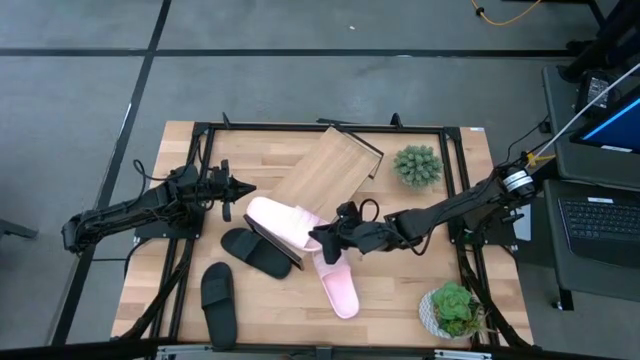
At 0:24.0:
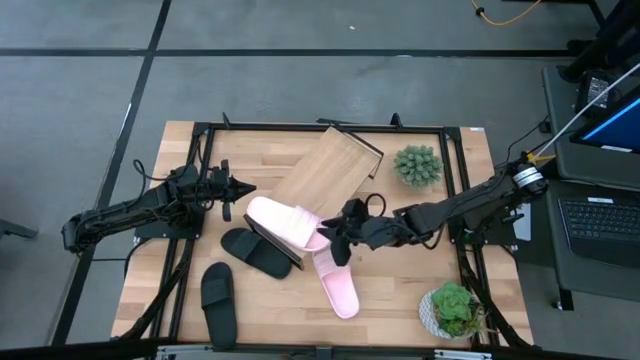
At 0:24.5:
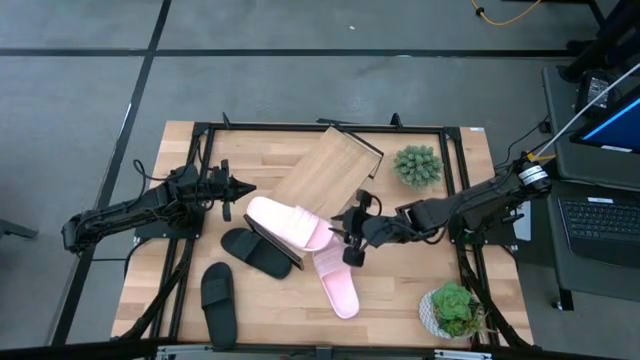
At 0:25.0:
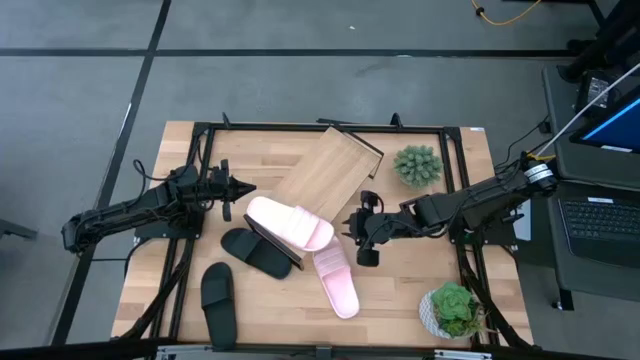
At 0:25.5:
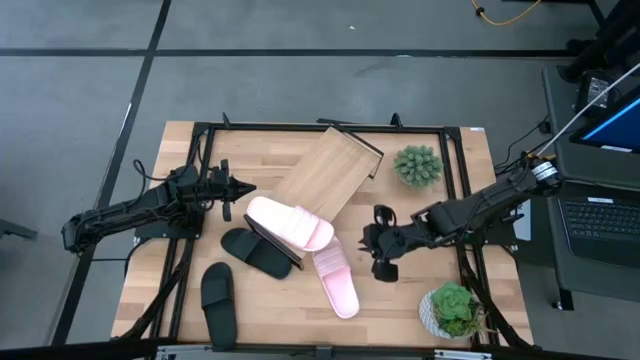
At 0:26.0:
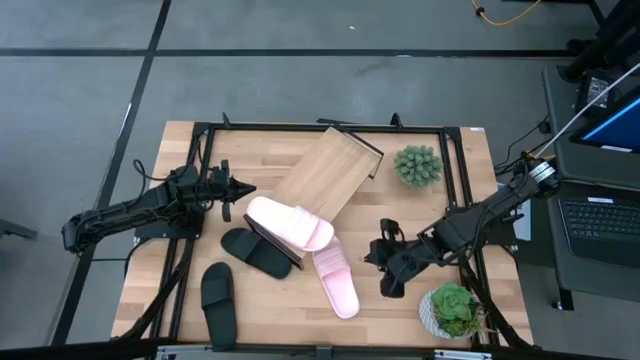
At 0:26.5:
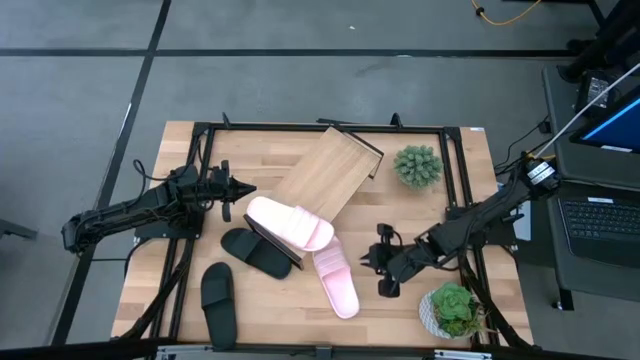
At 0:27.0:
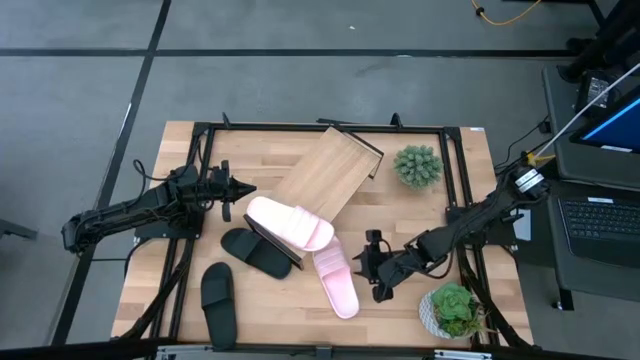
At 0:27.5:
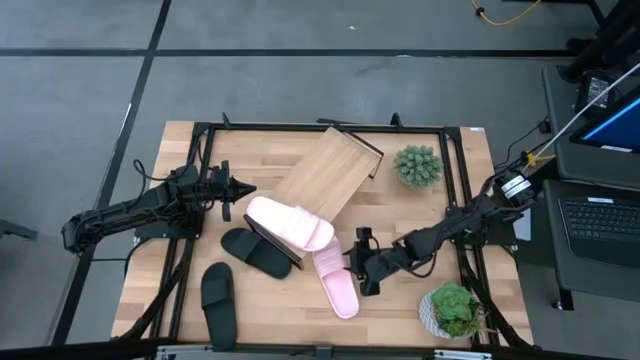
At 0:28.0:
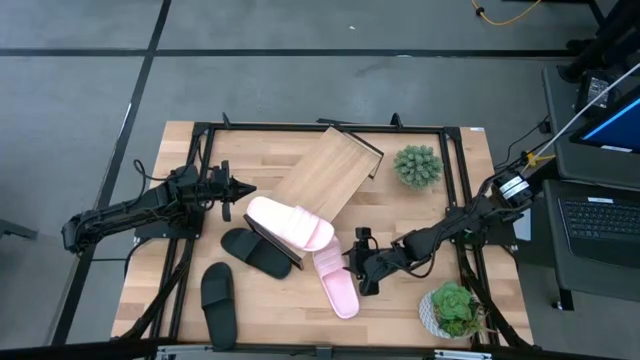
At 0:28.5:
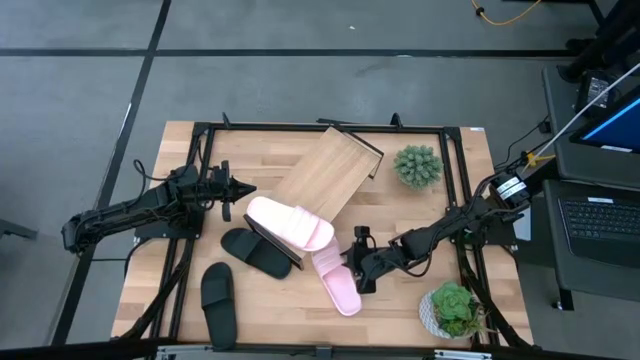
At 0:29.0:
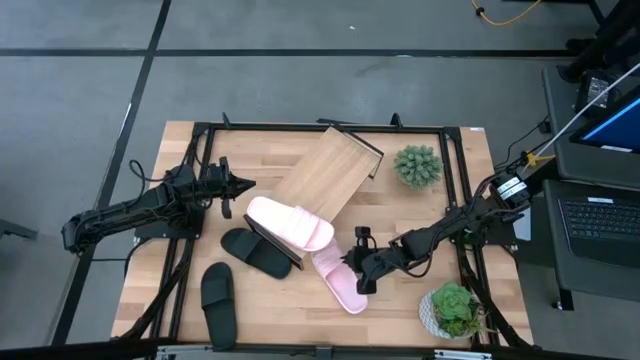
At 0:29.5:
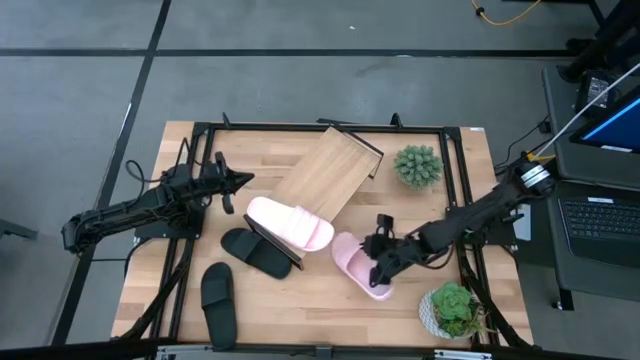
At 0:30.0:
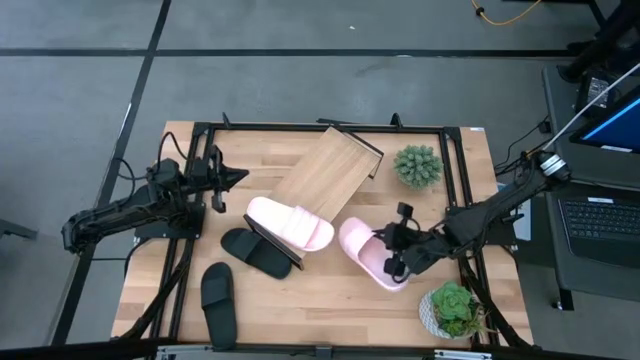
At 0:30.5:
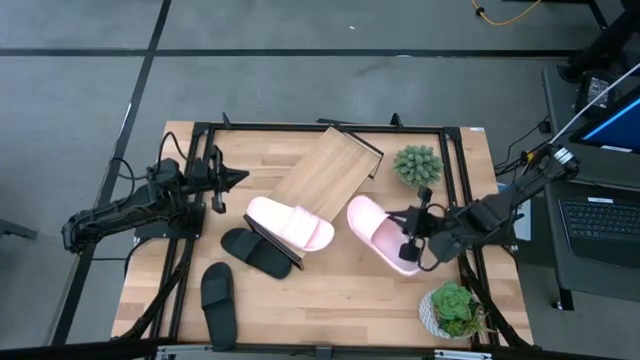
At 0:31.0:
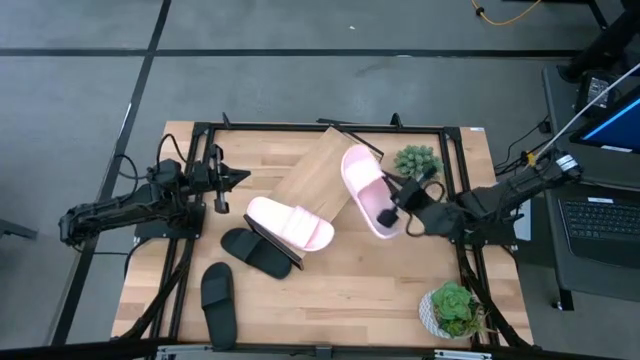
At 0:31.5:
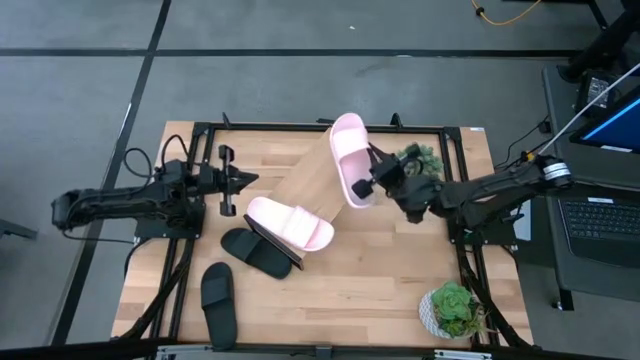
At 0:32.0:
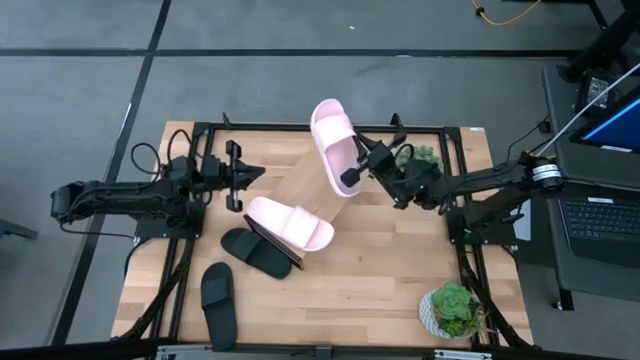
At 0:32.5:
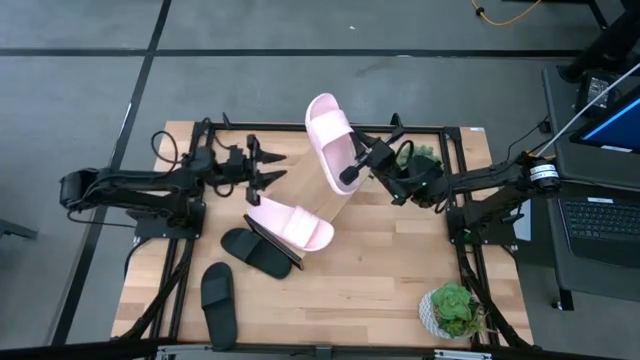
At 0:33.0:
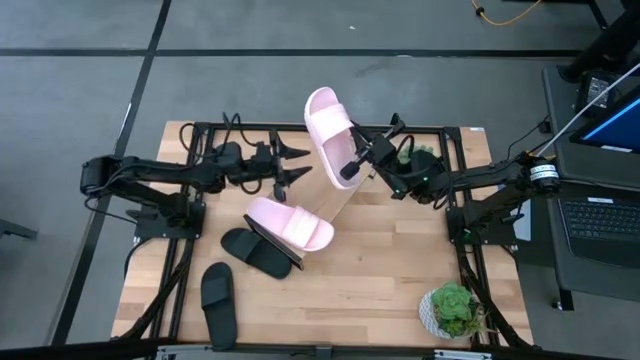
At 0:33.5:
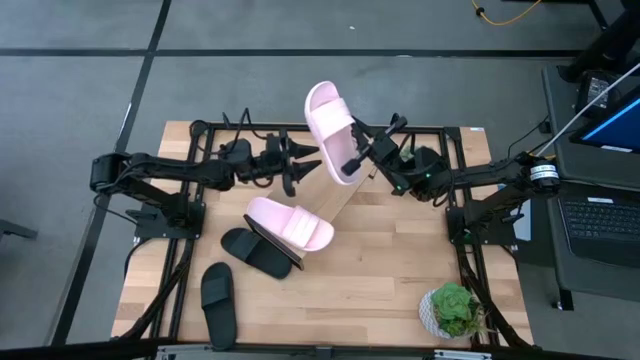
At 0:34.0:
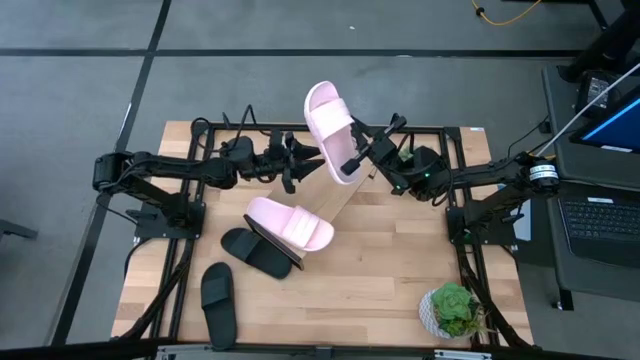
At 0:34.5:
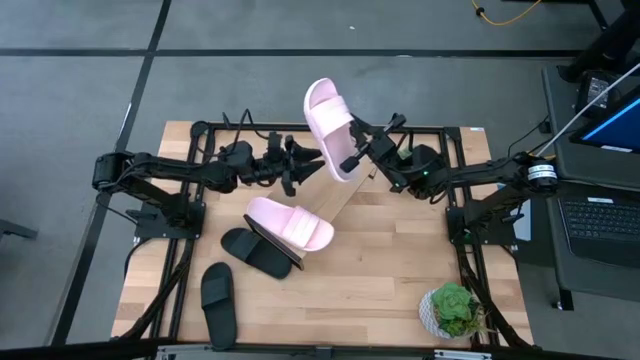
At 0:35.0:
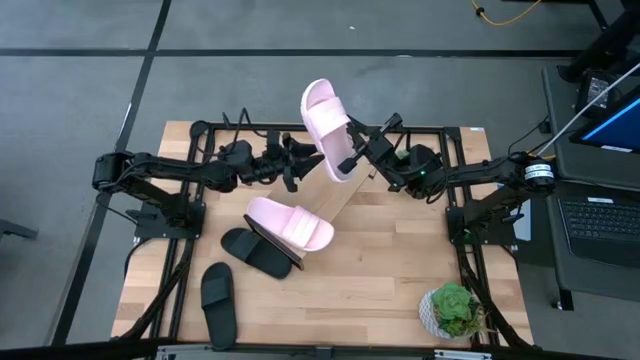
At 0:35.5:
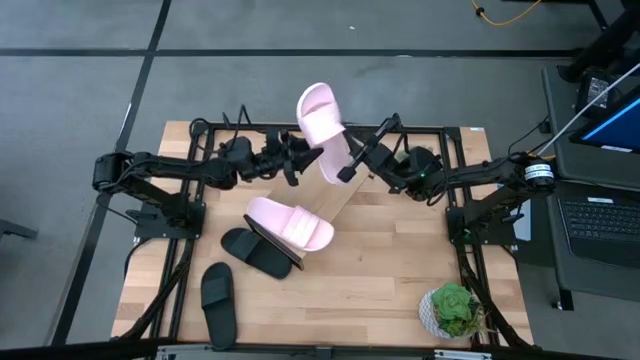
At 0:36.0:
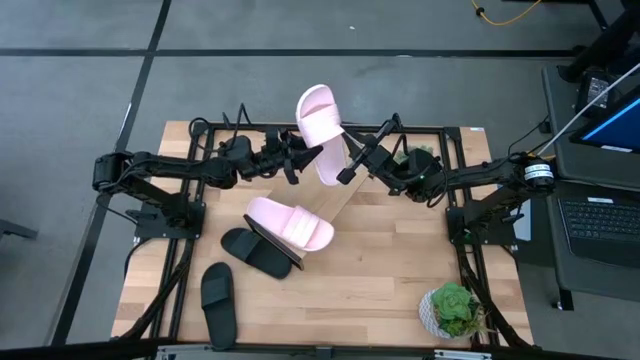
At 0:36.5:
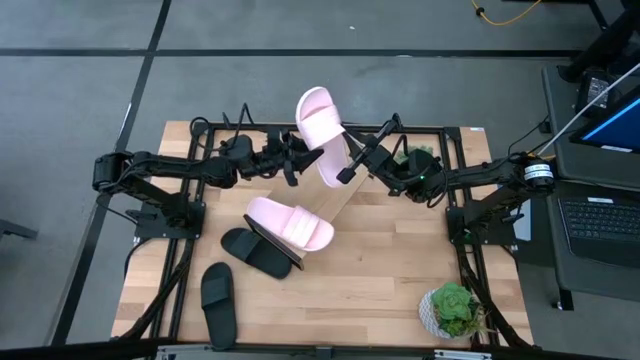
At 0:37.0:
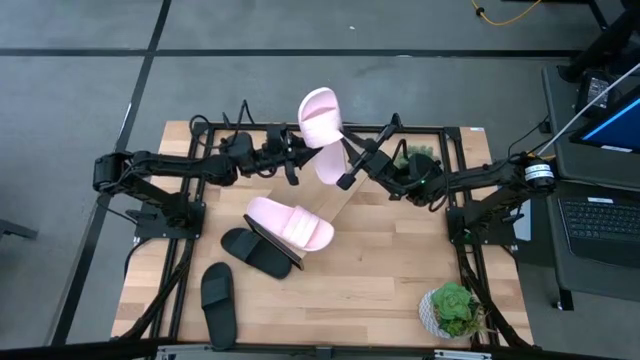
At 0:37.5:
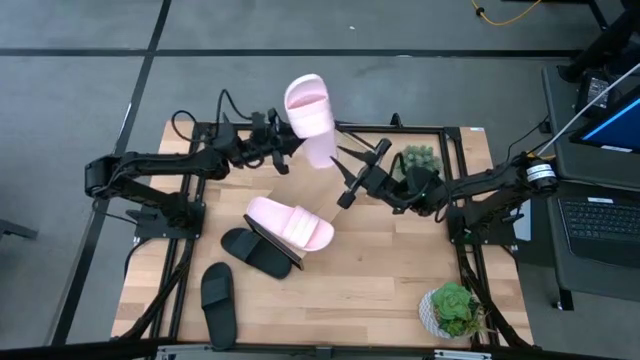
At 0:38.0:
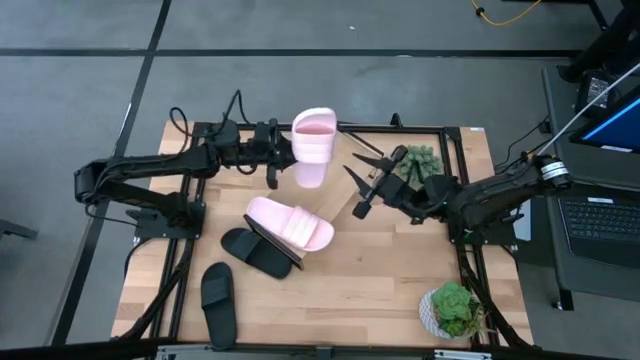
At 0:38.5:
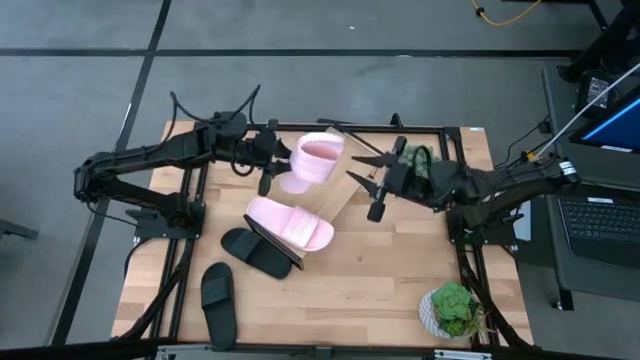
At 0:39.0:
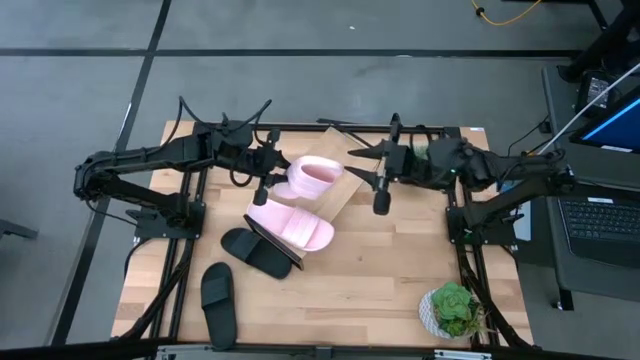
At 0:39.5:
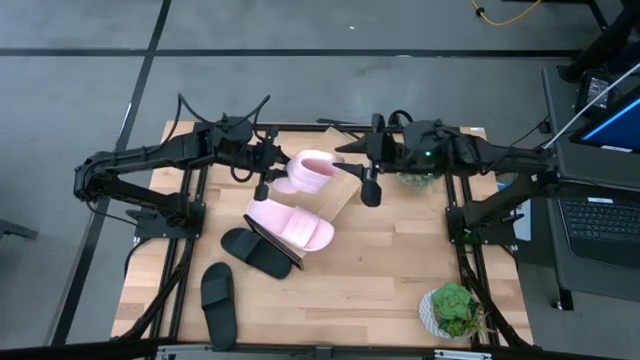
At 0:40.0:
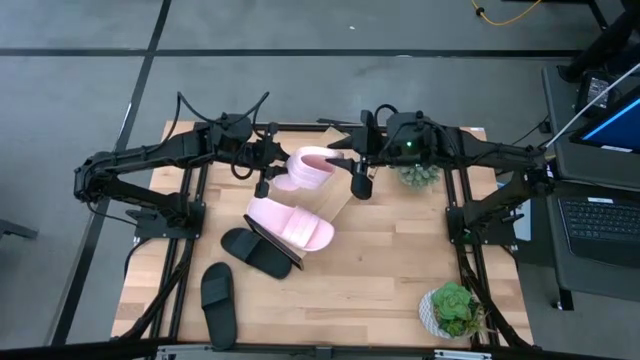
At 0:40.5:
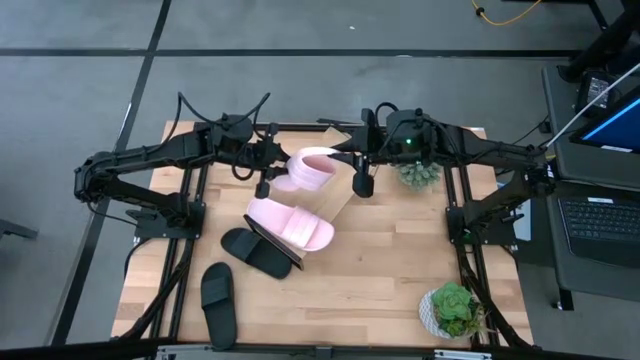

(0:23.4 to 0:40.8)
Task: Pick and place slides into the shelf
Put the pink slides on the shelf

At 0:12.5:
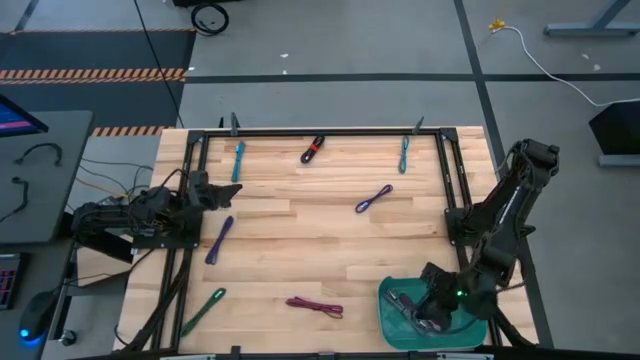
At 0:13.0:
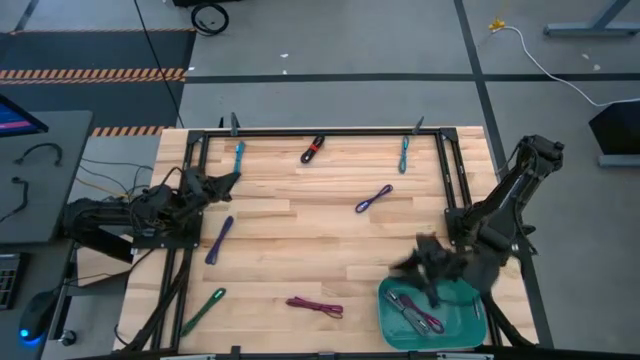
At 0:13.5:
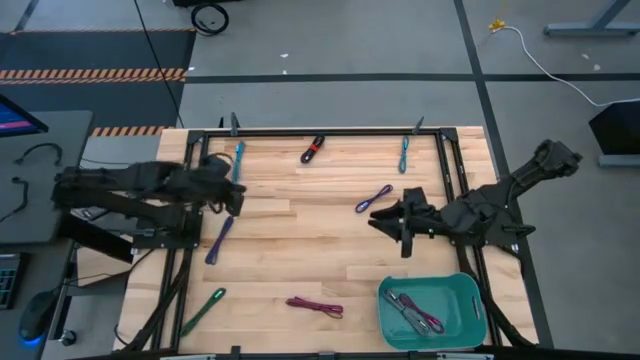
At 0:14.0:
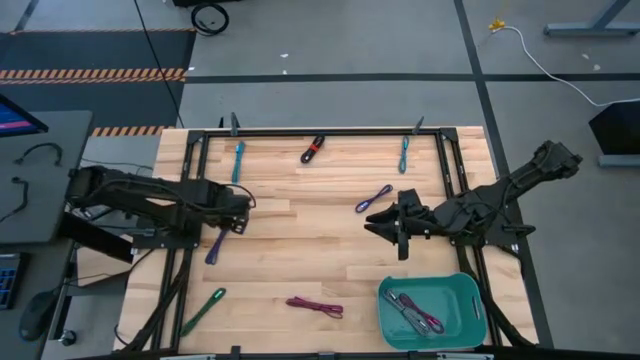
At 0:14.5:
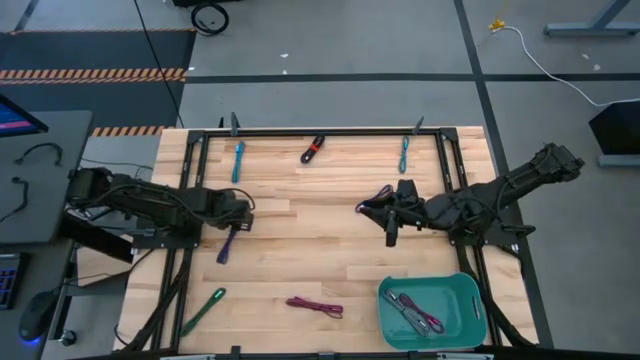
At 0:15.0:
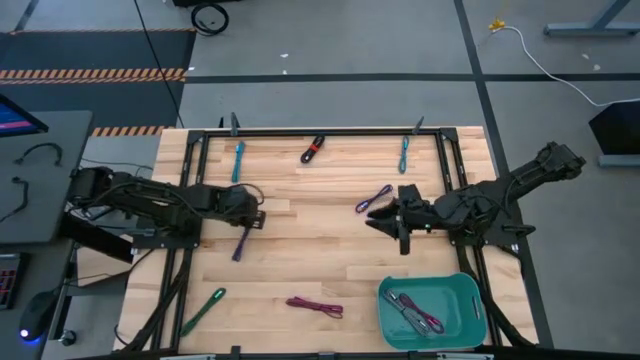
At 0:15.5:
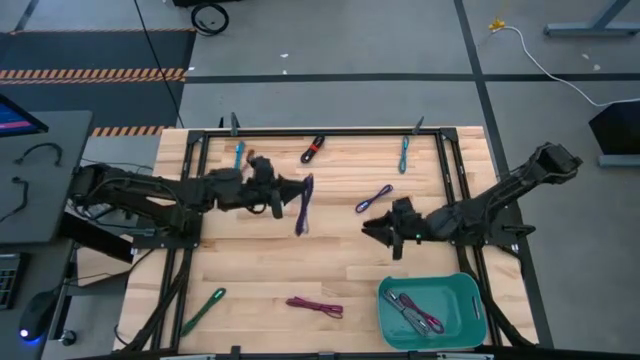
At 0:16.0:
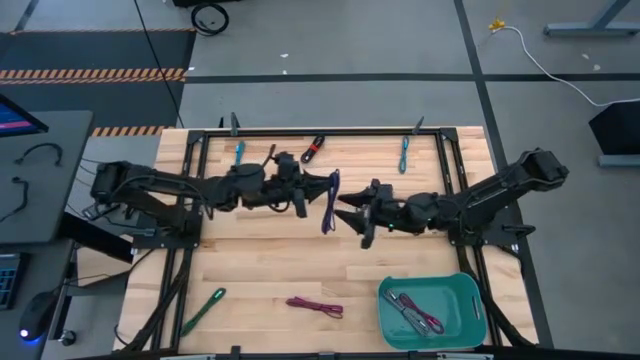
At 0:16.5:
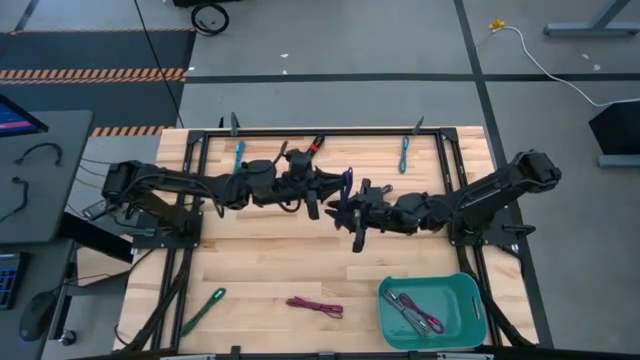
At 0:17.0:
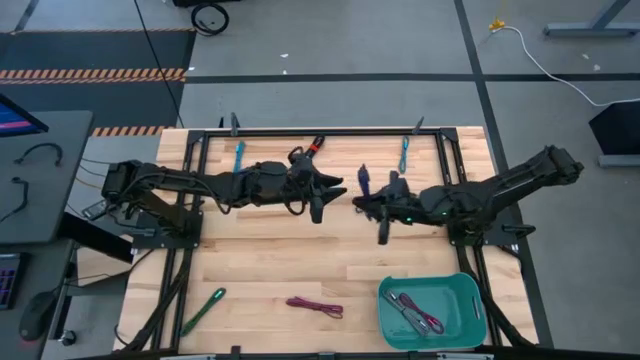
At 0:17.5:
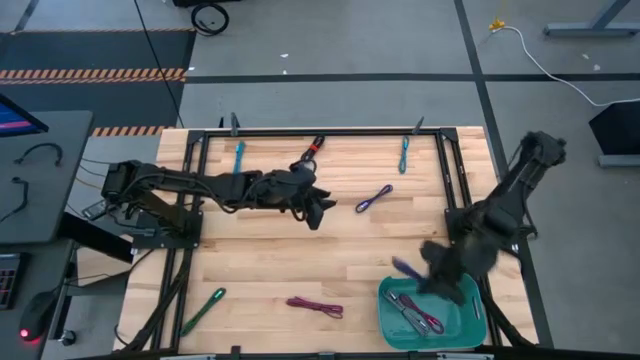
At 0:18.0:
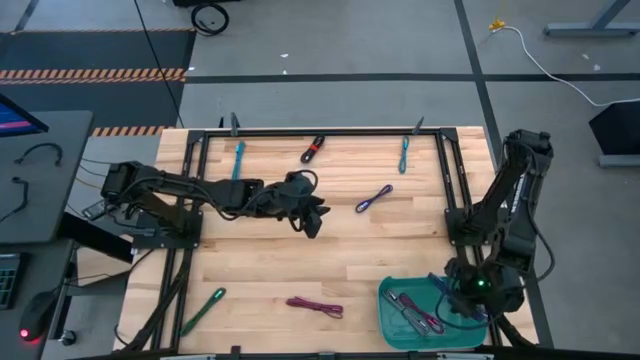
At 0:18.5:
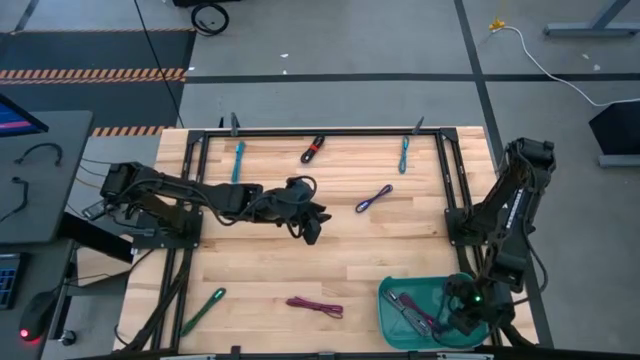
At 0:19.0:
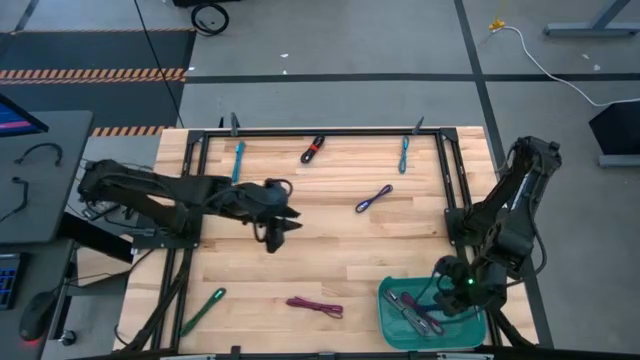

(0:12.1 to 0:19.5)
Task: Pick and place USB-C Cables
Put the purple charger cable into the green bin
